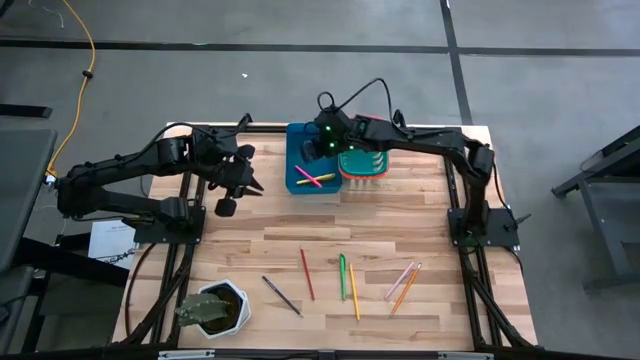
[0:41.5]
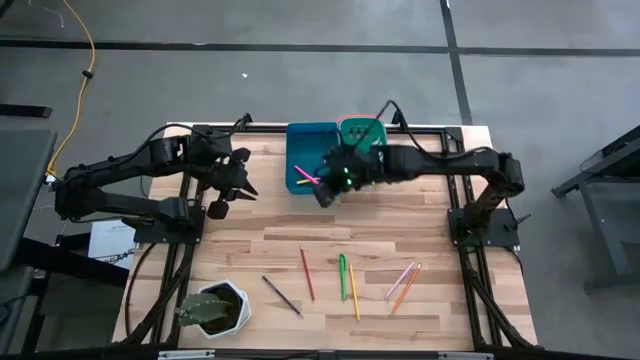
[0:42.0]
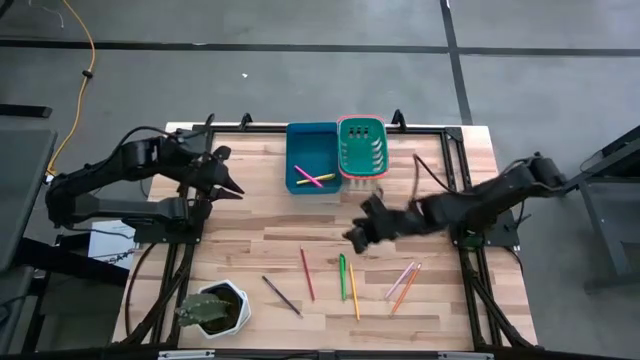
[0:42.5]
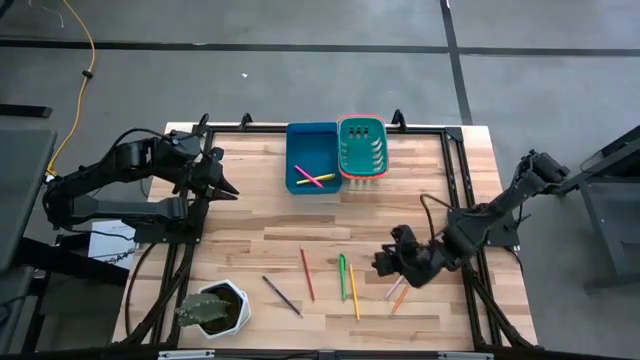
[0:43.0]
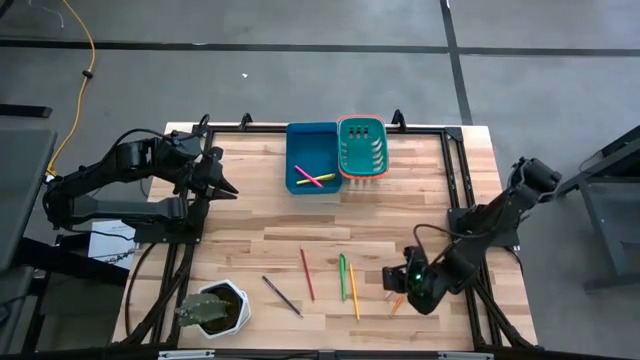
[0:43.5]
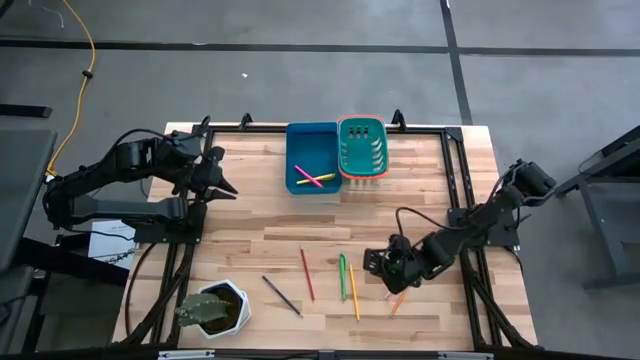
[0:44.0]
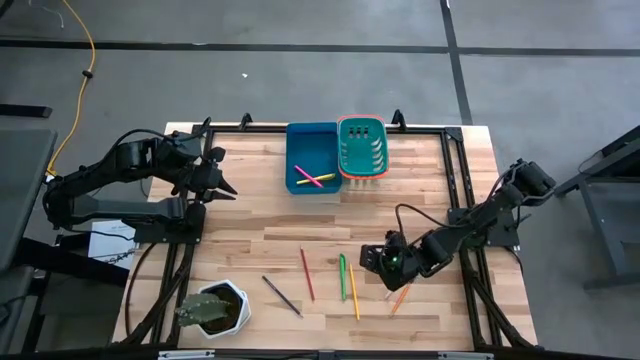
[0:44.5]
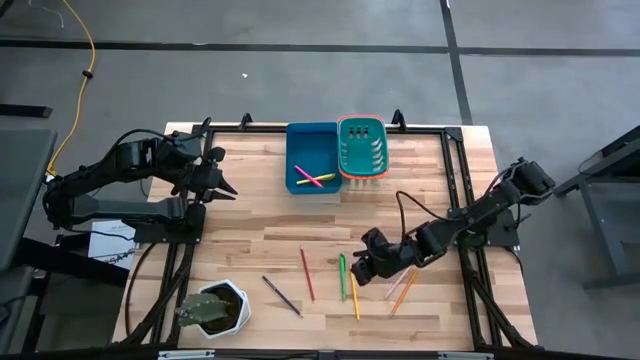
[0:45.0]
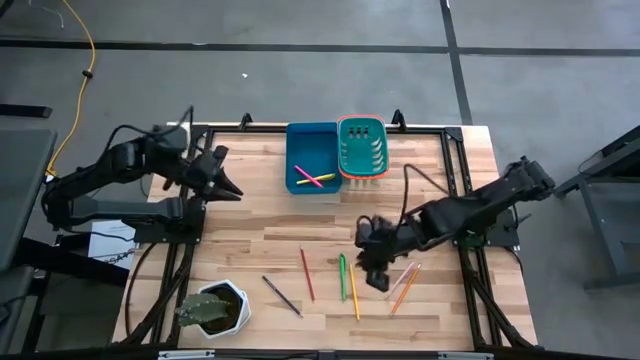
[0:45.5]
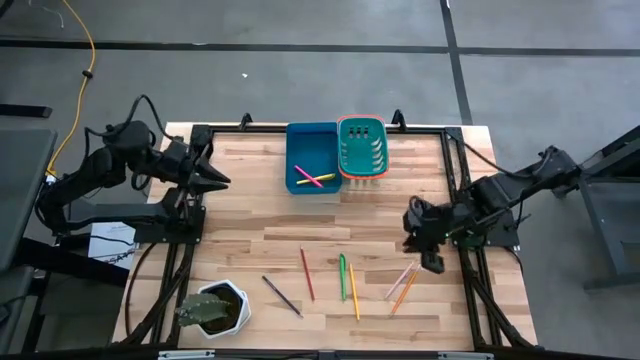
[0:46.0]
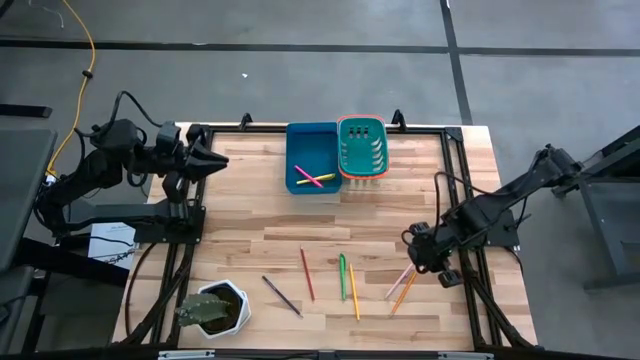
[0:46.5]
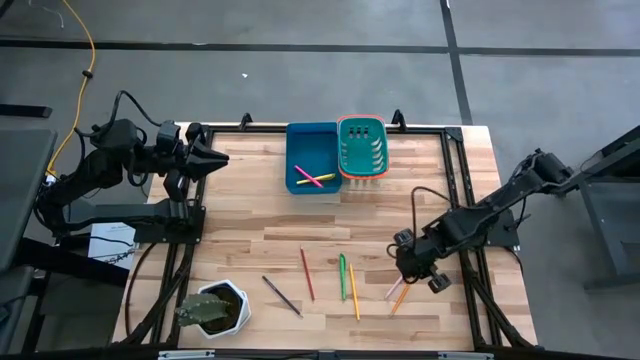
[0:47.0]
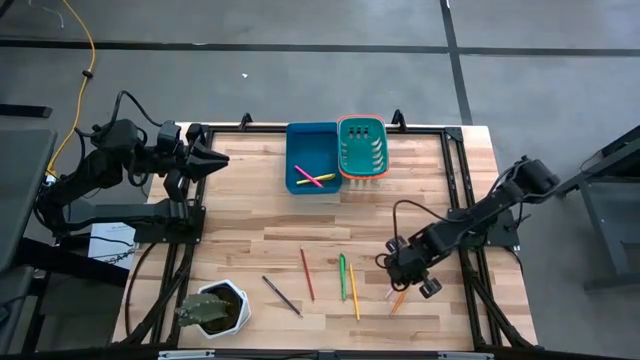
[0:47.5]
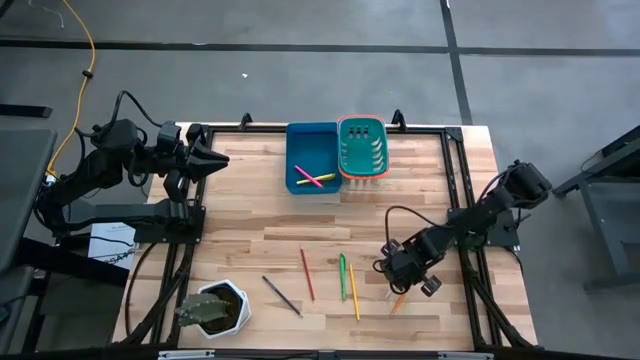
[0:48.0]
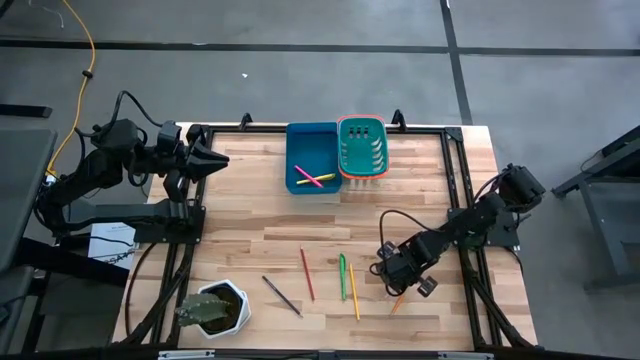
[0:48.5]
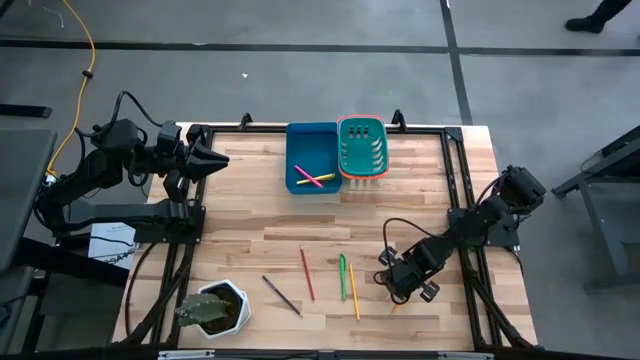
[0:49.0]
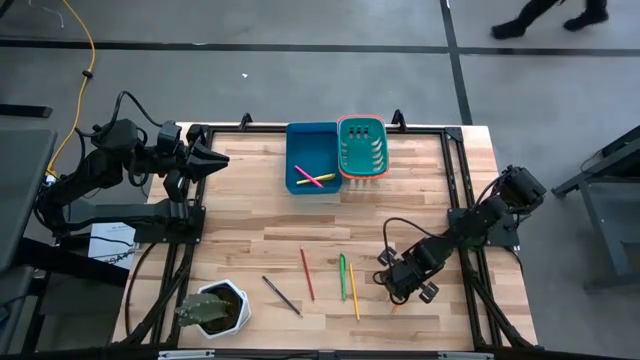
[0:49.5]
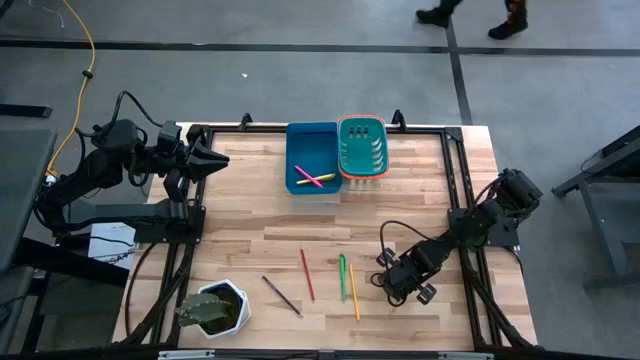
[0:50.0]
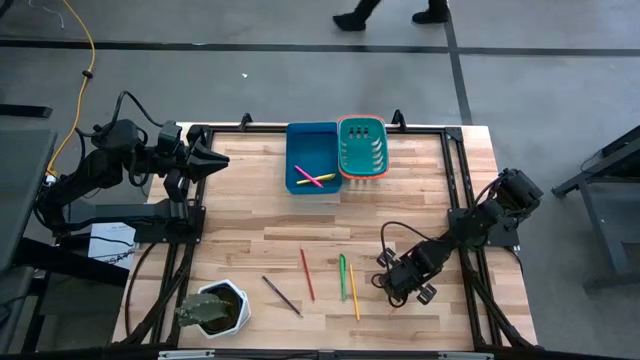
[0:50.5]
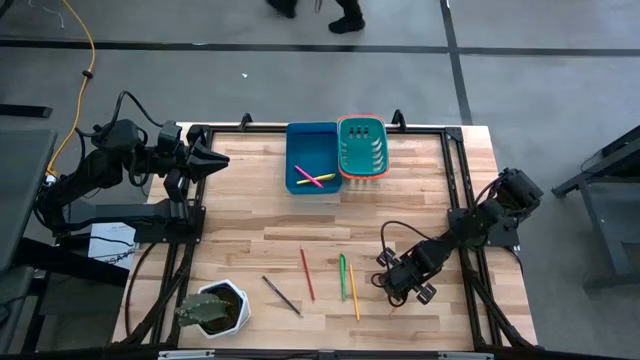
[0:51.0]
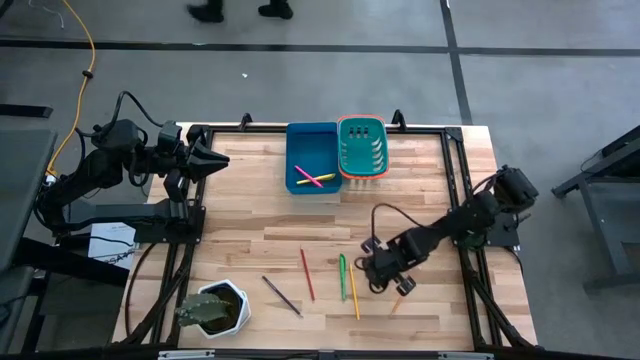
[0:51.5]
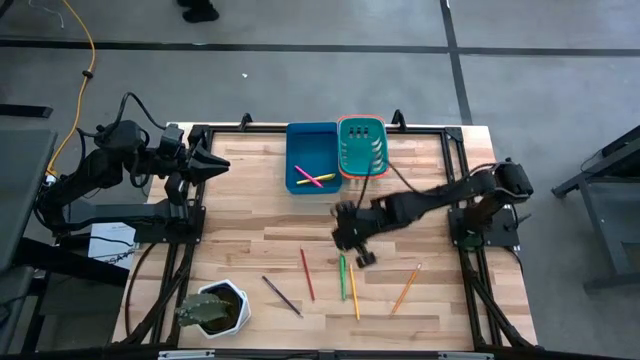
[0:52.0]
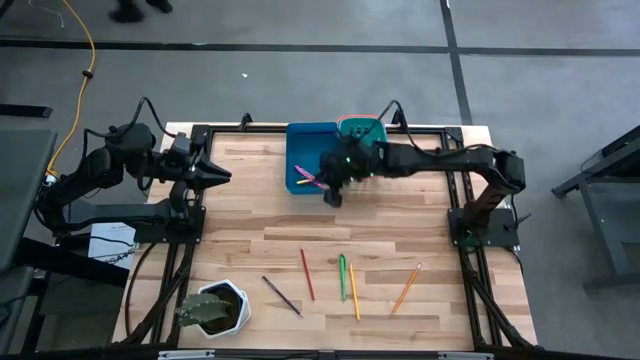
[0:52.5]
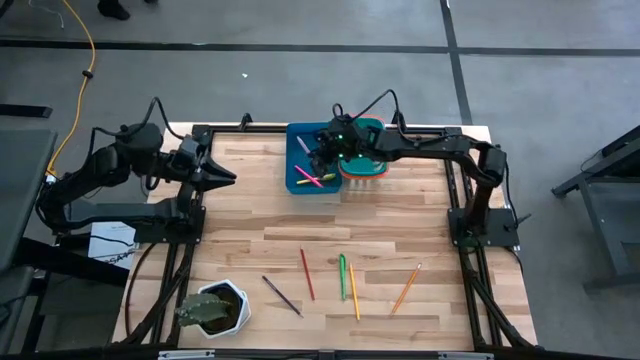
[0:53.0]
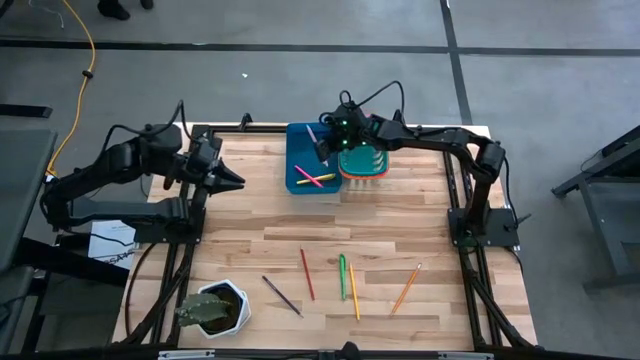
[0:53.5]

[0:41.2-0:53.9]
Task: Sort pens & pencils
Put the purple pen into the blue bin

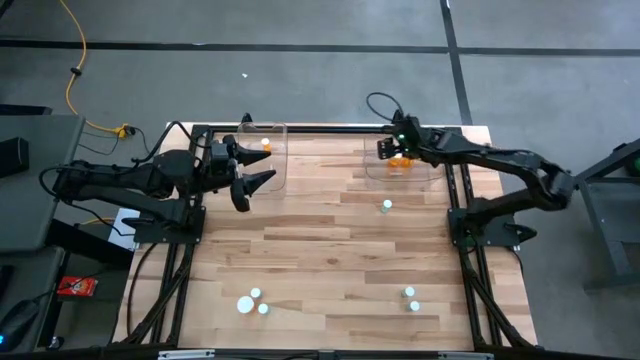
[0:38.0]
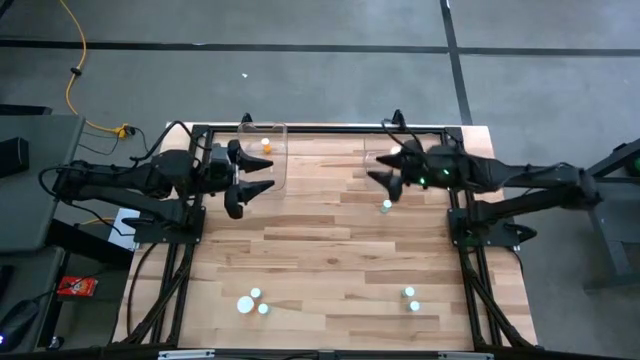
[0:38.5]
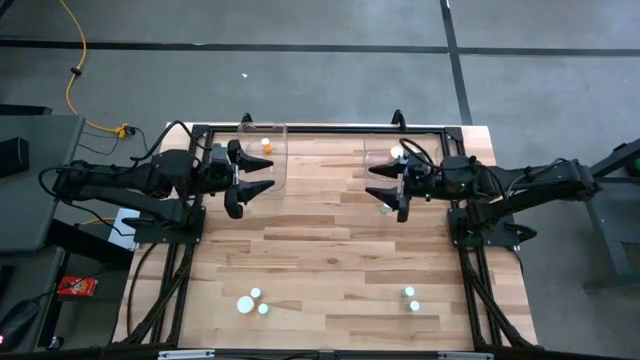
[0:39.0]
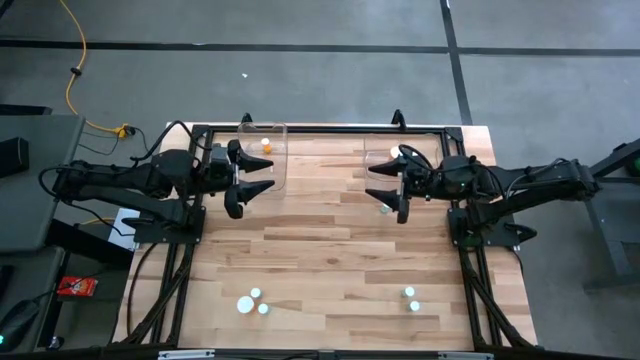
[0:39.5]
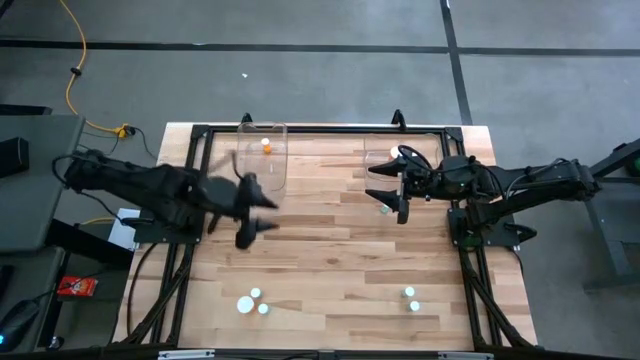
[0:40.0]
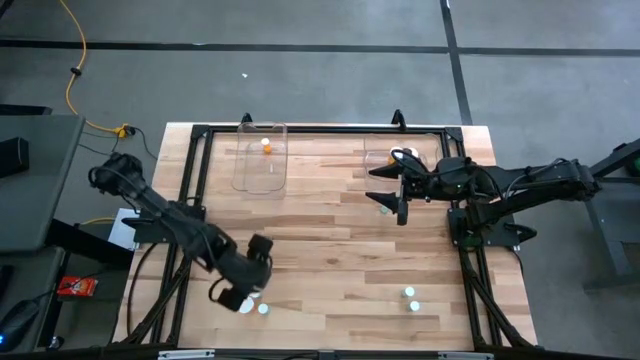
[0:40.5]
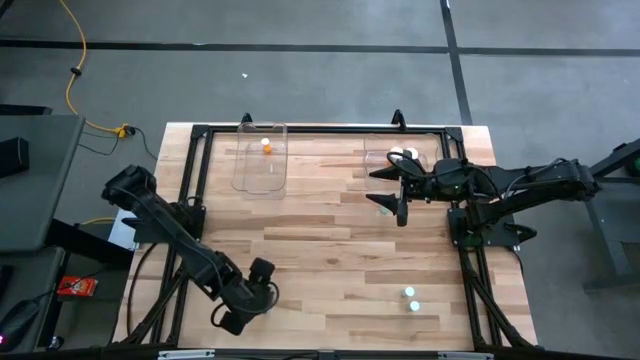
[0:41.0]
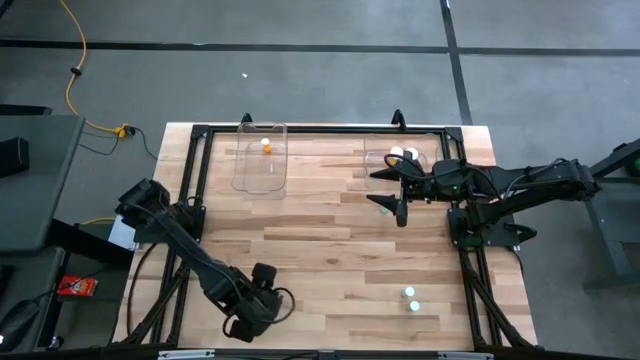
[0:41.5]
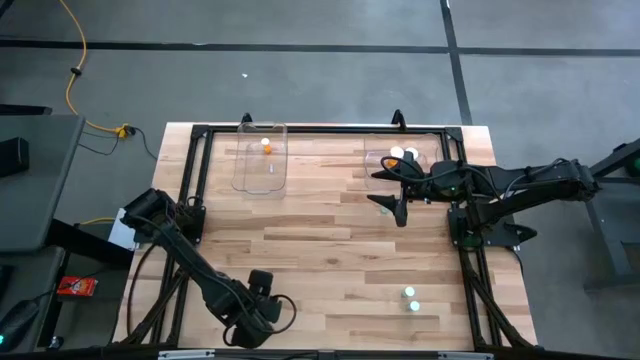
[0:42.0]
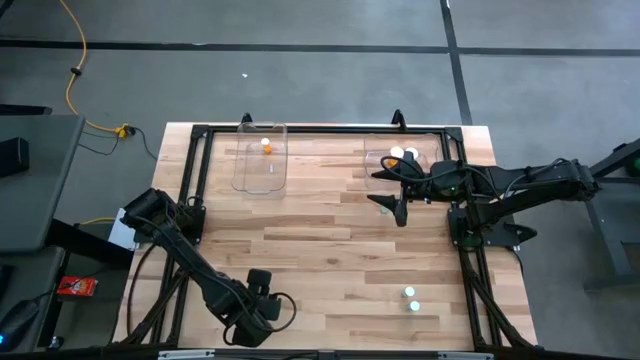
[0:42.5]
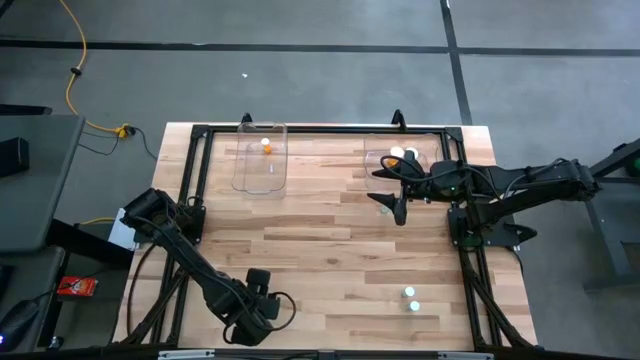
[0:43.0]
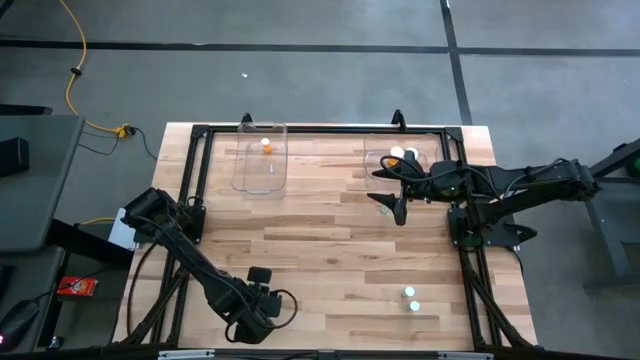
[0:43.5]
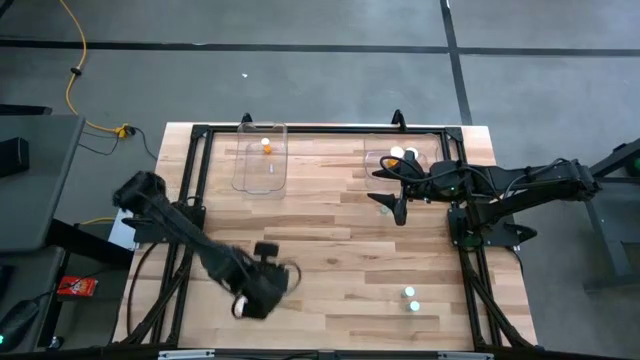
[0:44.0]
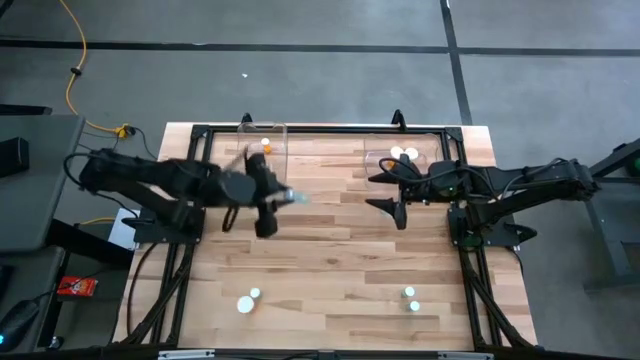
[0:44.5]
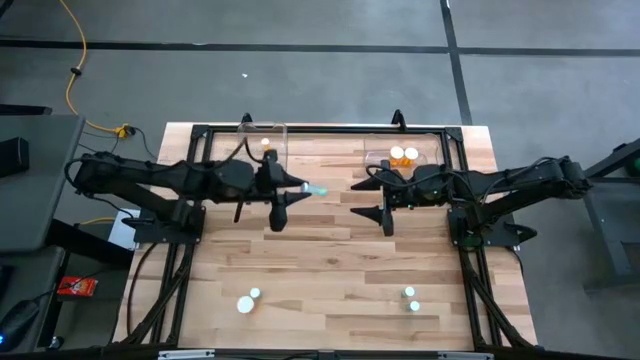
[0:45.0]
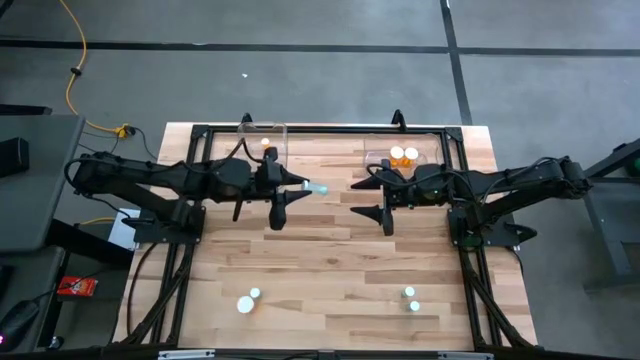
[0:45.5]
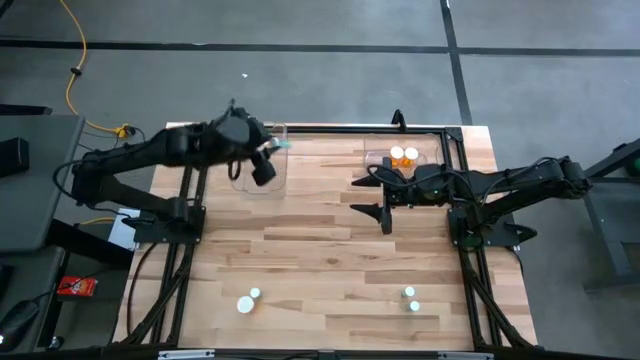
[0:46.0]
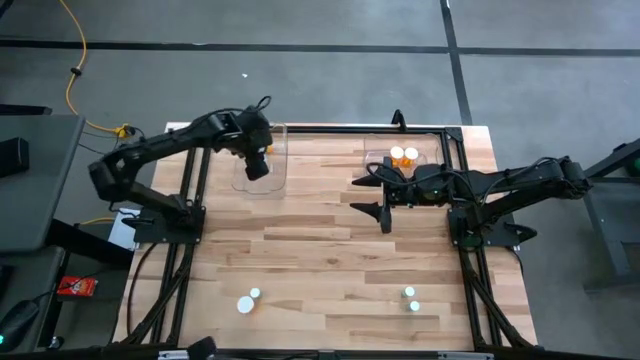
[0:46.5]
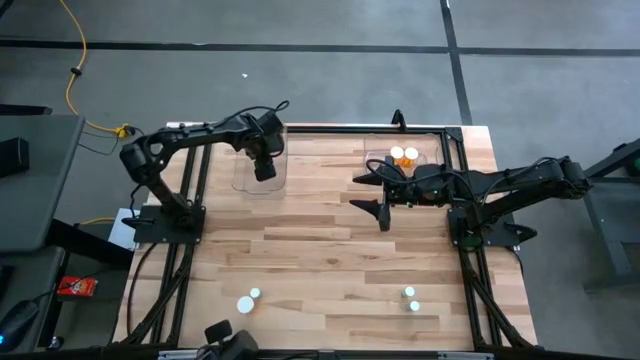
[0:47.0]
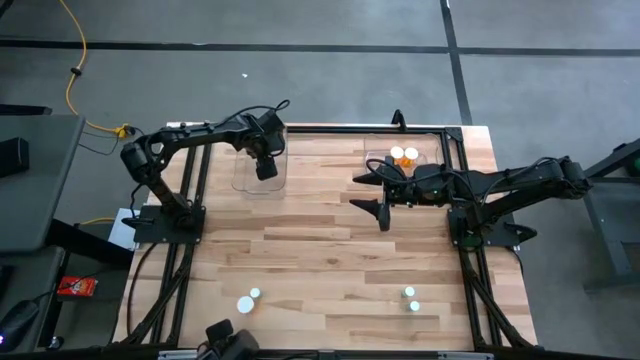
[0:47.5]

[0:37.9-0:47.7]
Task: Pick and place medicine bottles into bin by pill shape (circle, oval)
Put the blue pill bottle into the left transparent bin
